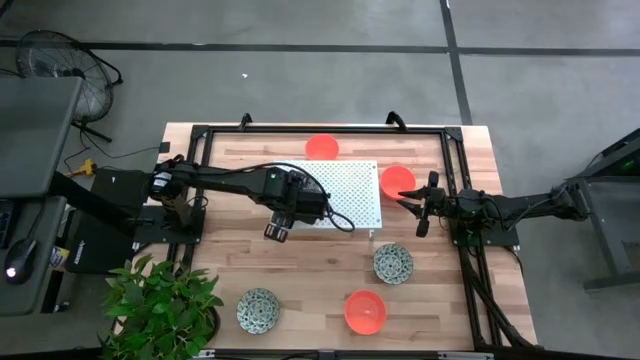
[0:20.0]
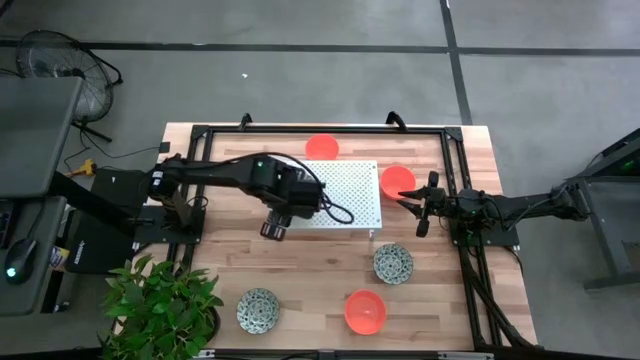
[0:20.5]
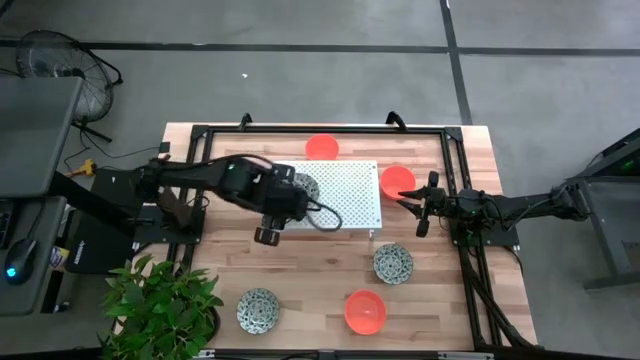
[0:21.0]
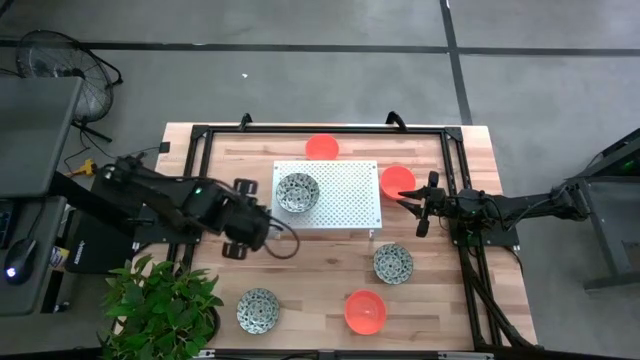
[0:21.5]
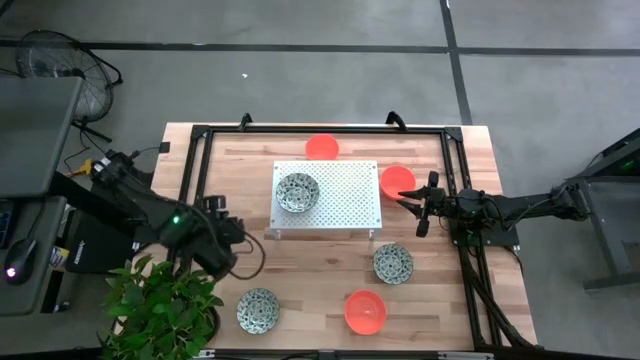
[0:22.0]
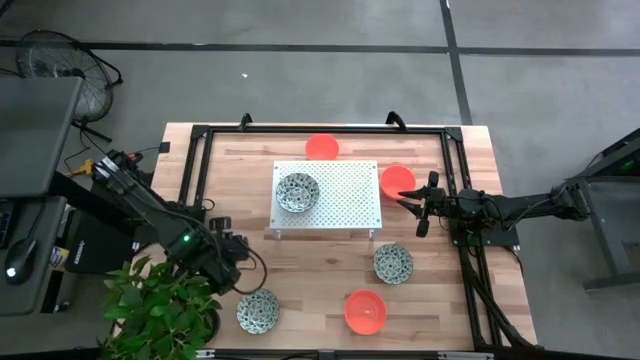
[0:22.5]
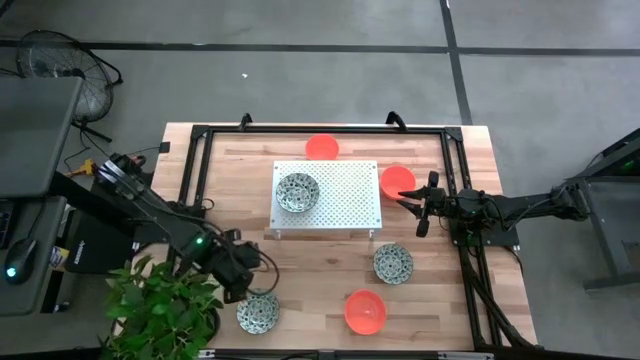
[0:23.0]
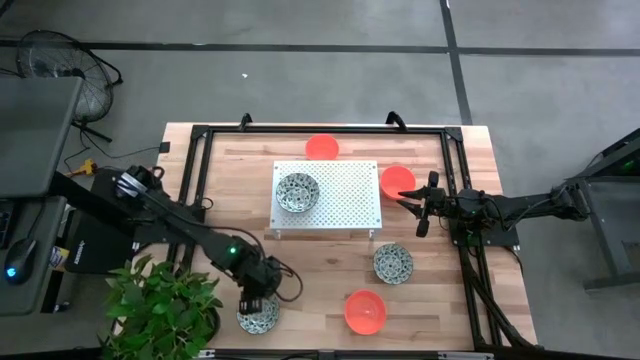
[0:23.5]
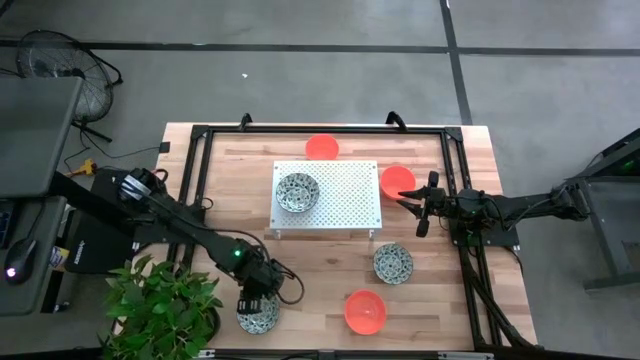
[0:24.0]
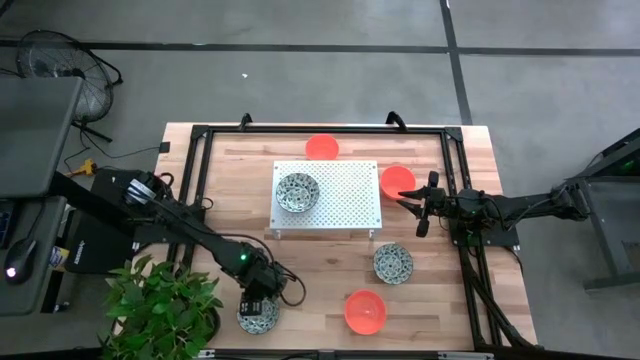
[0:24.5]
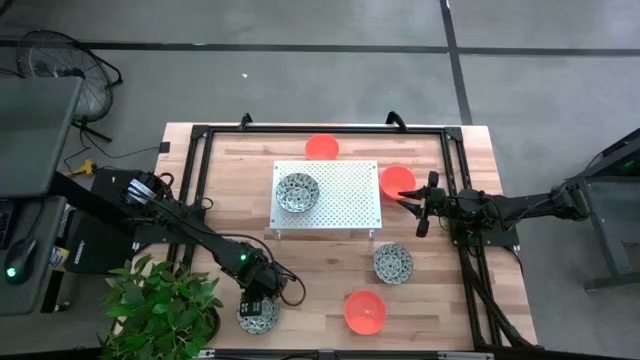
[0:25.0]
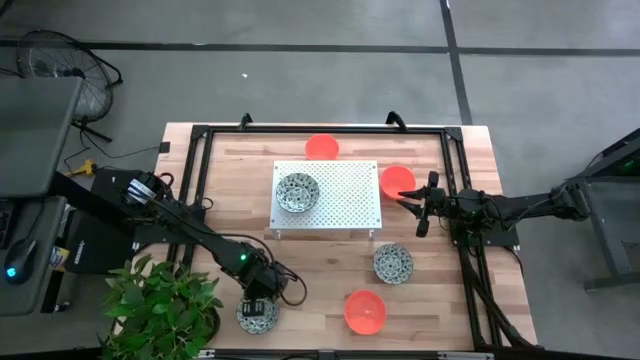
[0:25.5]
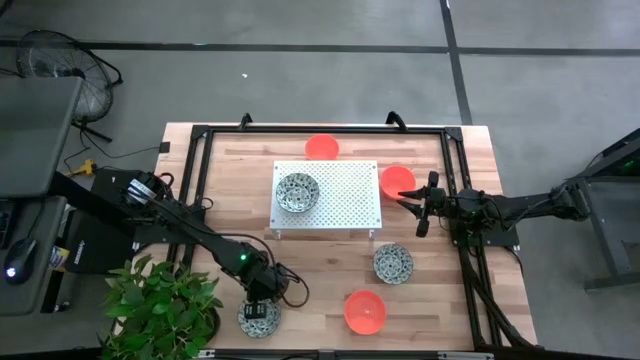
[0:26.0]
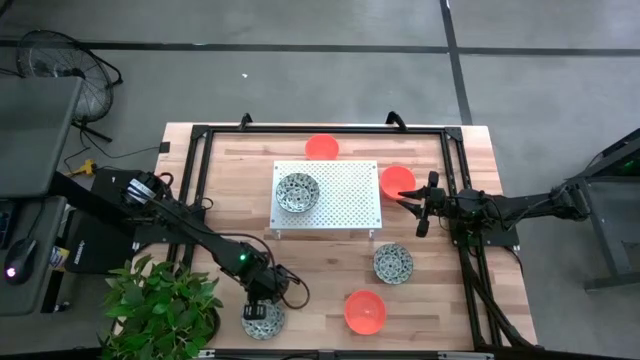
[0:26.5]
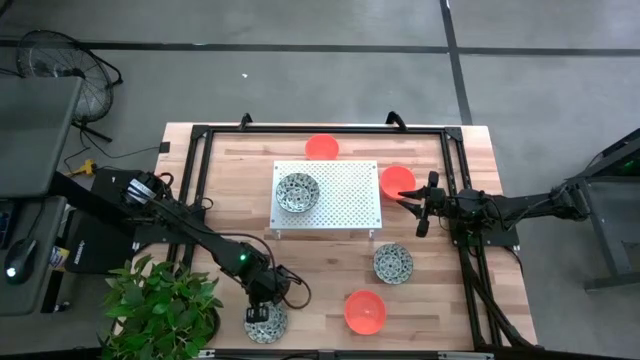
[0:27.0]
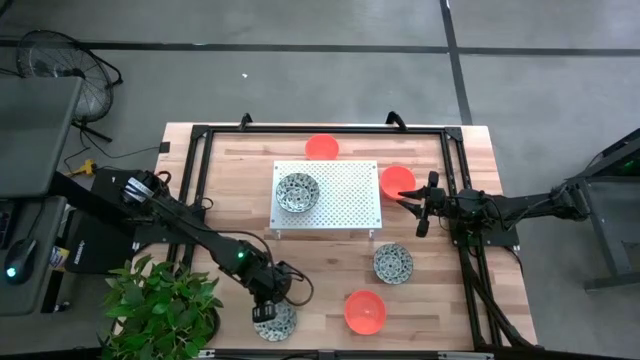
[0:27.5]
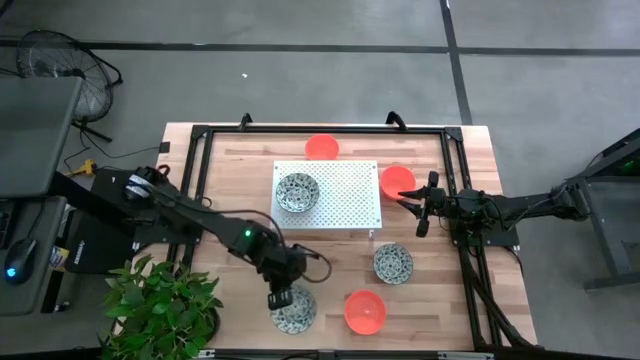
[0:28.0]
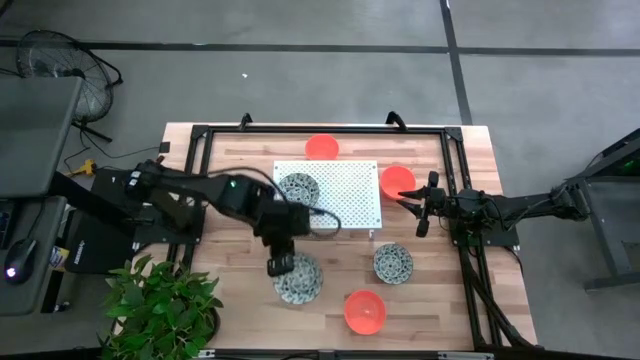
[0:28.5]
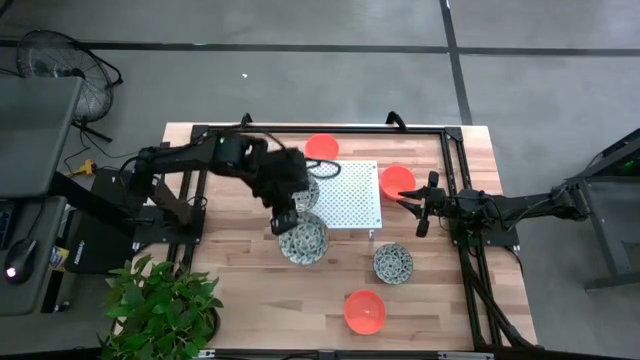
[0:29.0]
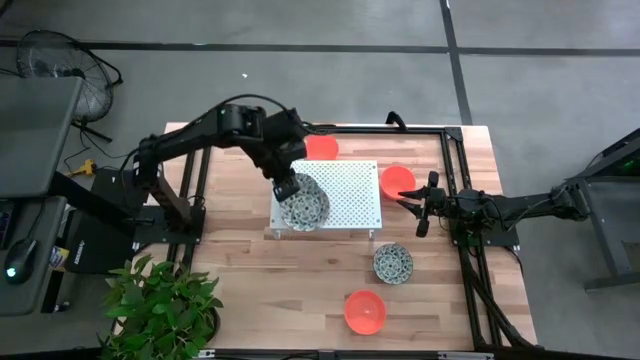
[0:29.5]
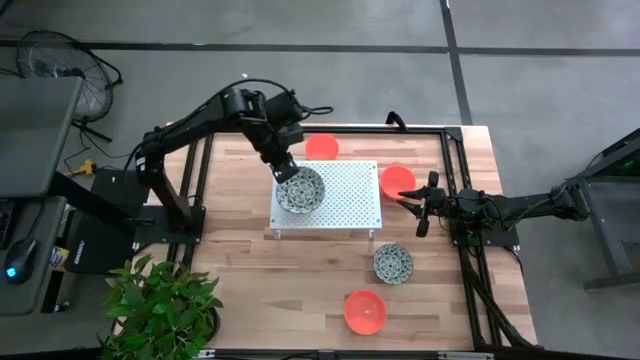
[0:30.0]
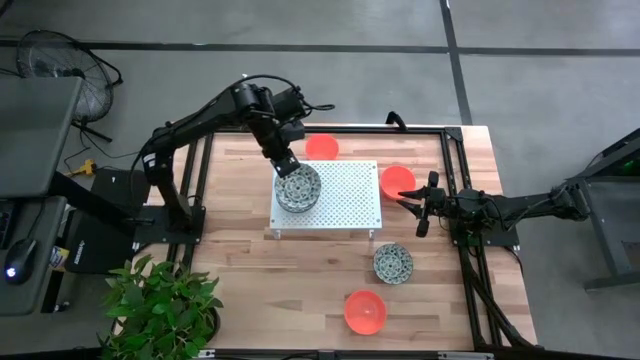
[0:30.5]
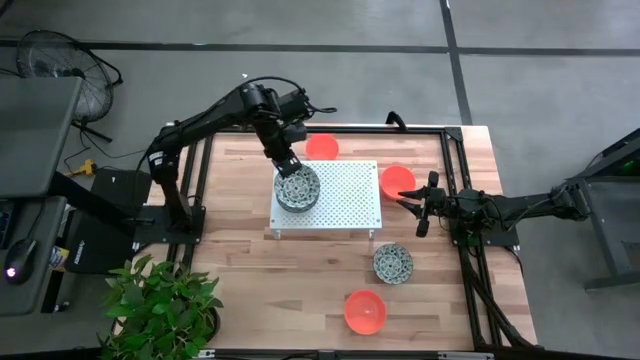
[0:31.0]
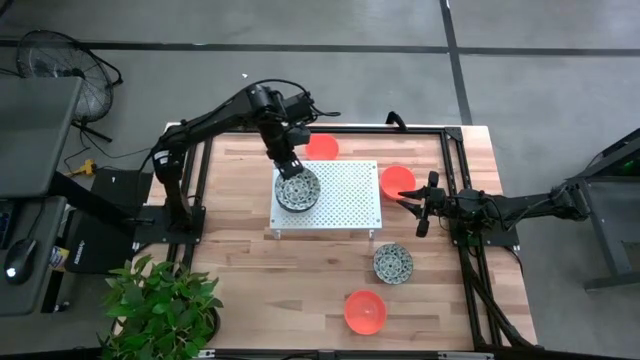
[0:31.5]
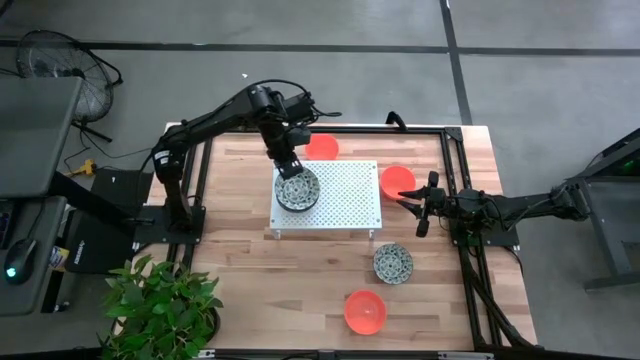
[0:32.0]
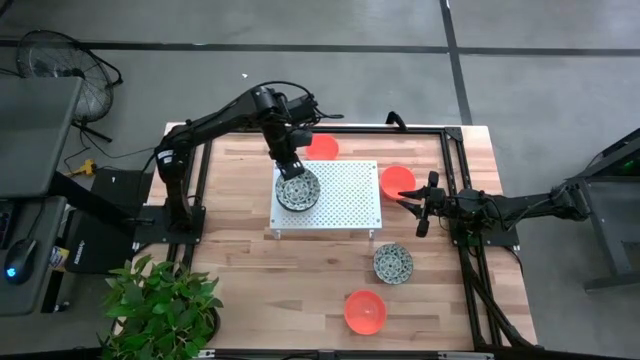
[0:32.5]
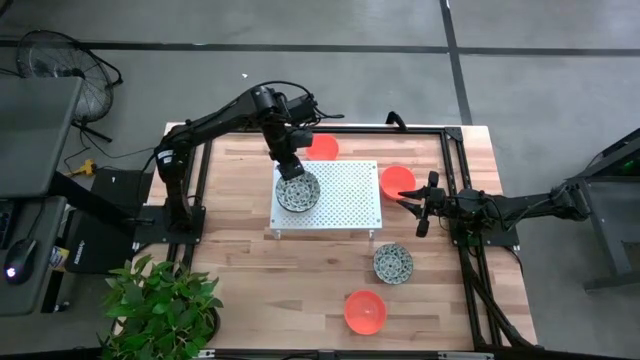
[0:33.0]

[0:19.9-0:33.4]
Task: Pick & Place Mini bowls
Stack the left white patterned bowl on the white patterned bowl on the shelf

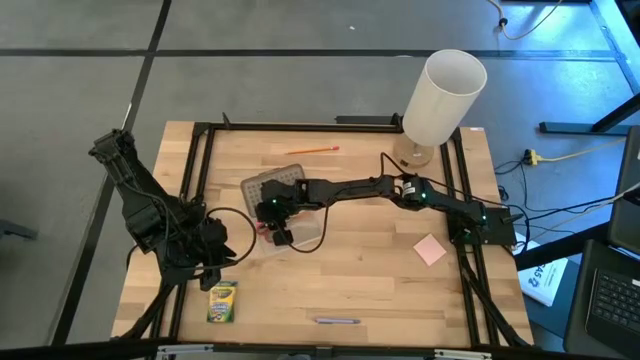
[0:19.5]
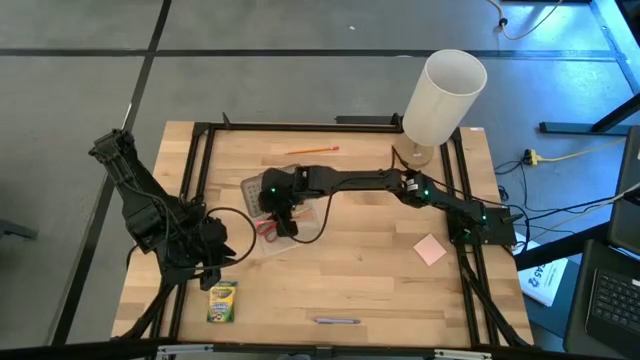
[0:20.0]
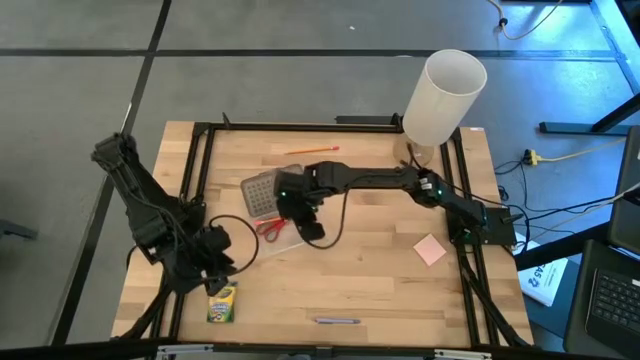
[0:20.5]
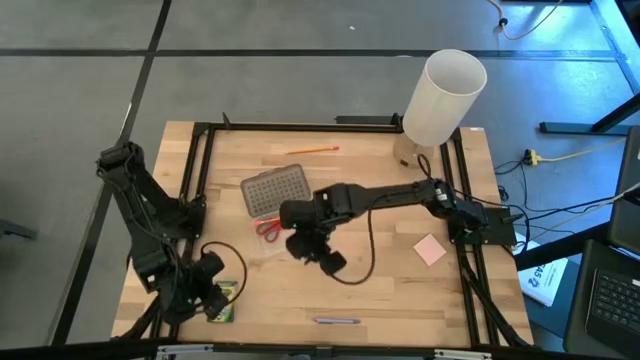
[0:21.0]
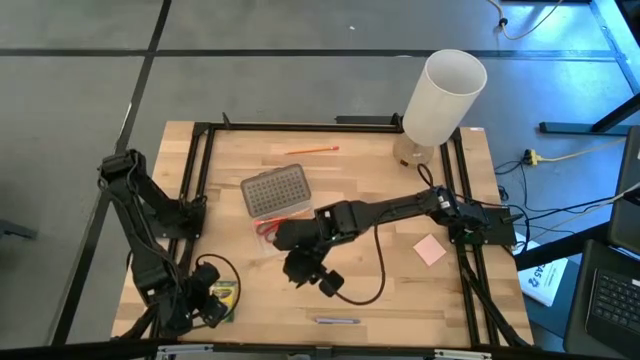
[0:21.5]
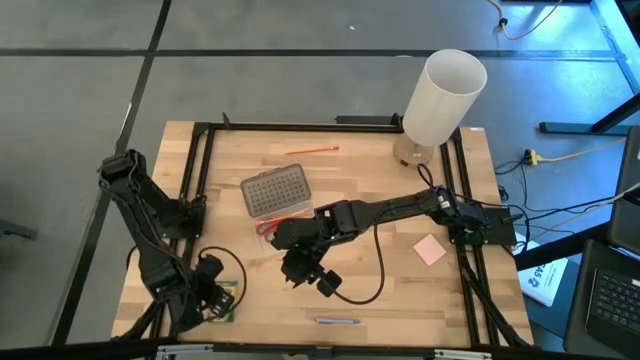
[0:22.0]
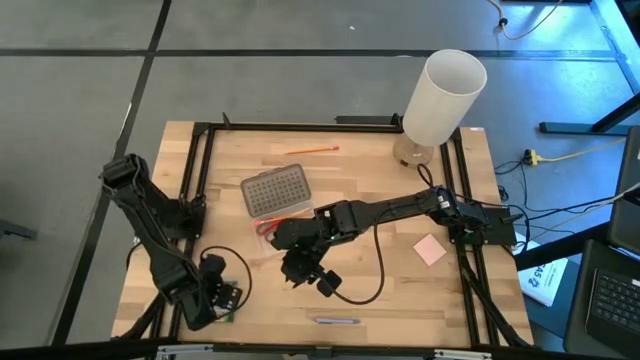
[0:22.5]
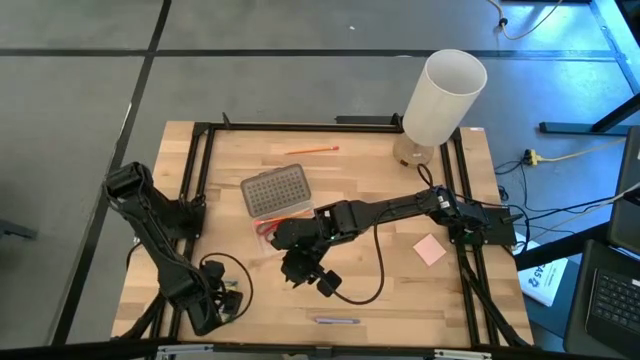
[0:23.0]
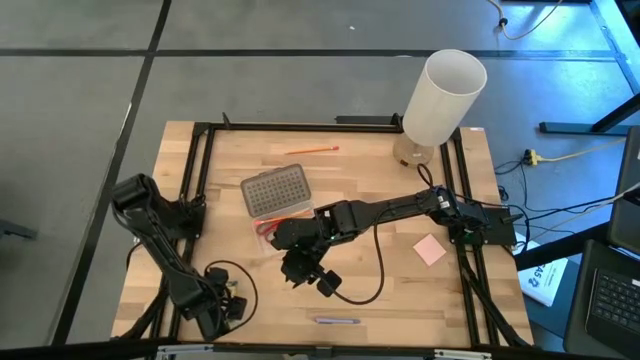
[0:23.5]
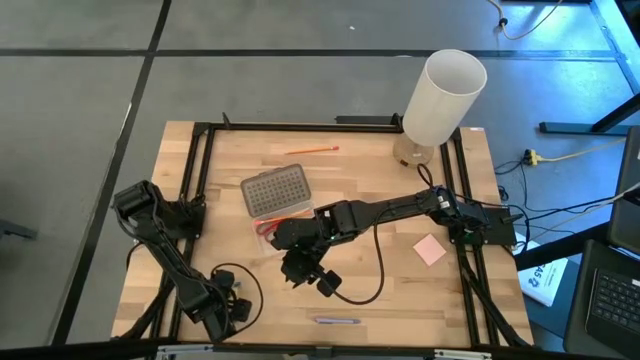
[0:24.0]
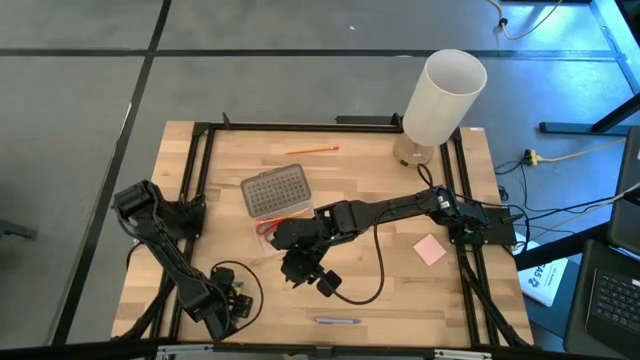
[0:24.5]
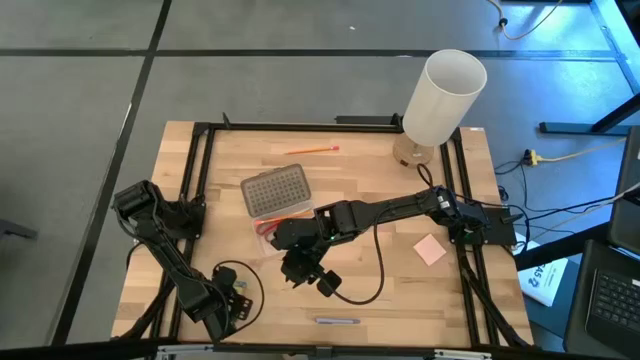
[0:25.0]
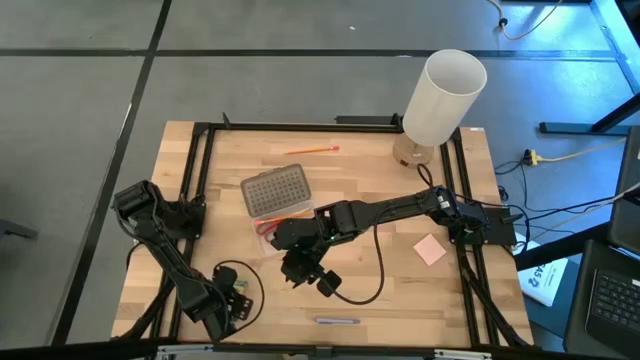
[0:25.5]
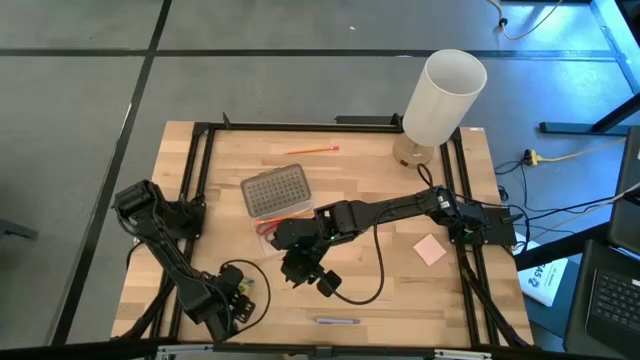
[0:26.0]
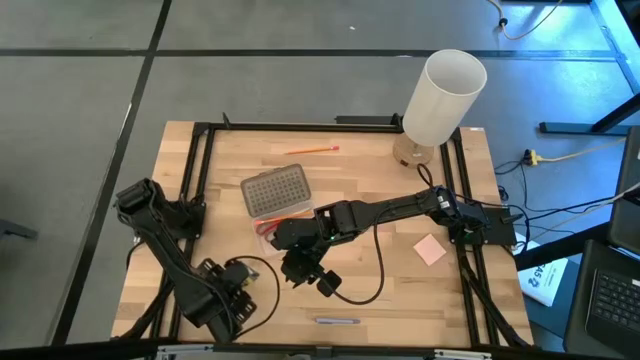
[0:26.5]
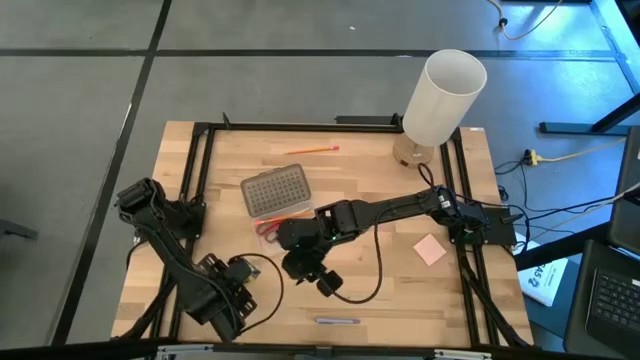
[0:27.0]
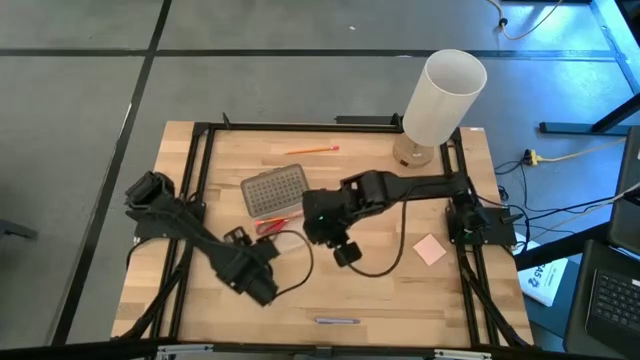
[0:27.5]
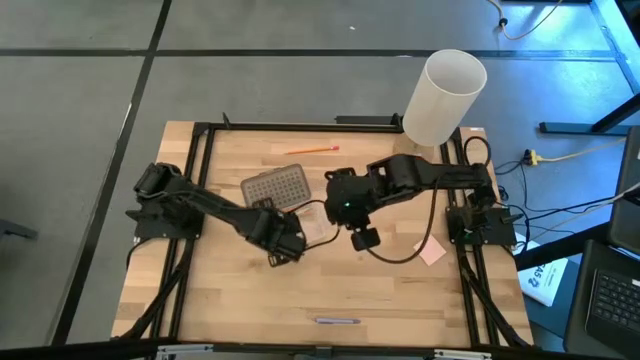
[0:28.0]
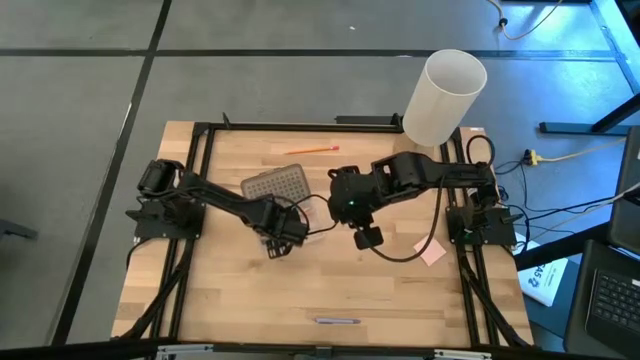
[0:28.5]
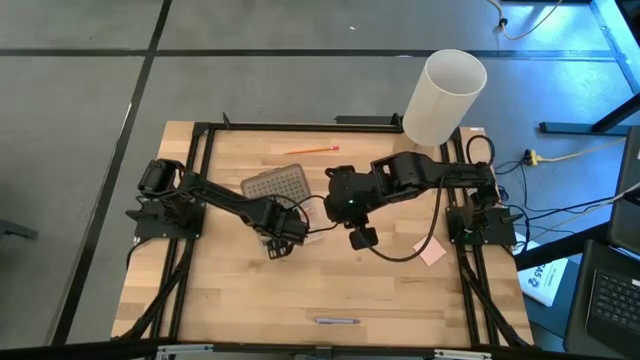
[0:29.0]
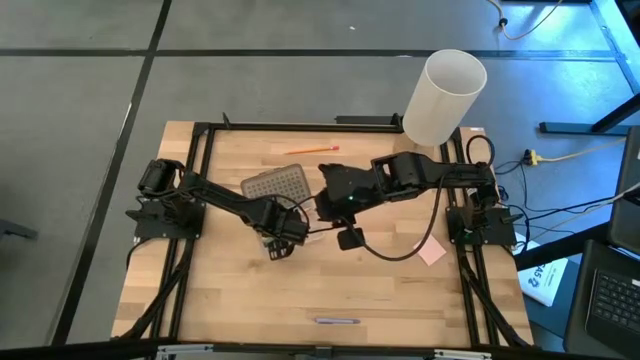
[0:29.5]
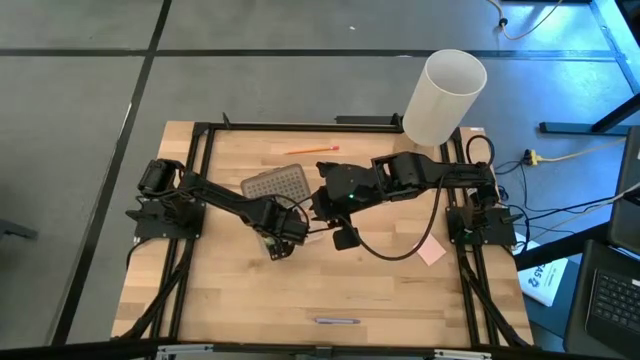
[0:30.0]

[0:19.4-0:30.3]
Task: Pack school essentials
Put the yellow crayon box into the transparent supply box
